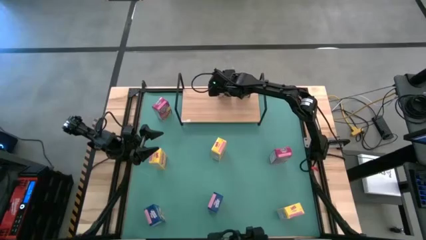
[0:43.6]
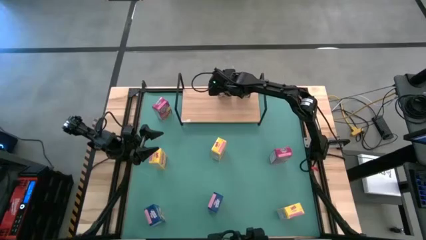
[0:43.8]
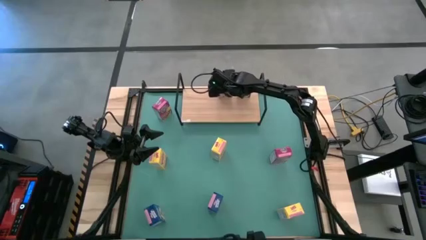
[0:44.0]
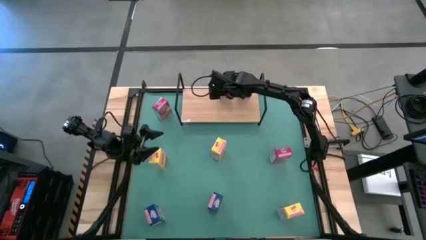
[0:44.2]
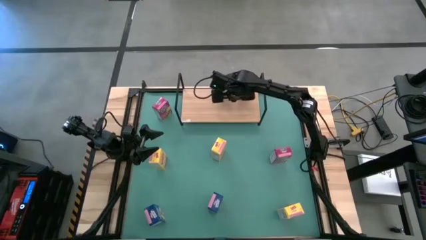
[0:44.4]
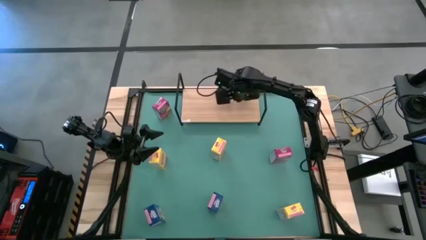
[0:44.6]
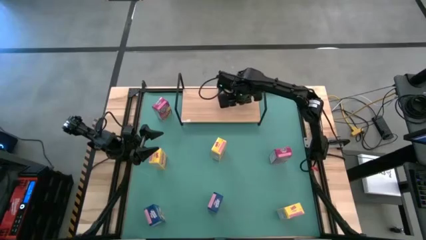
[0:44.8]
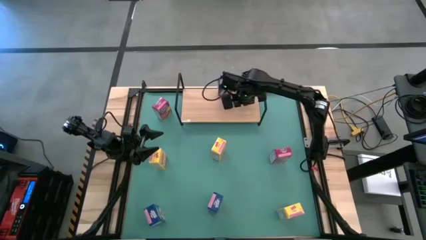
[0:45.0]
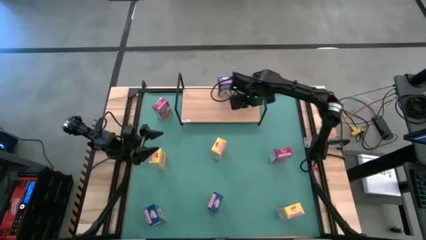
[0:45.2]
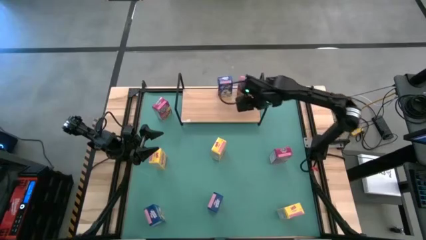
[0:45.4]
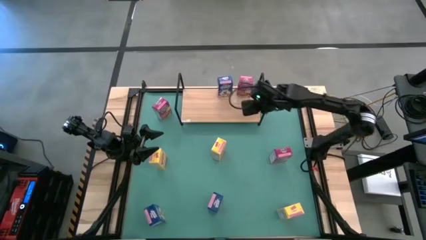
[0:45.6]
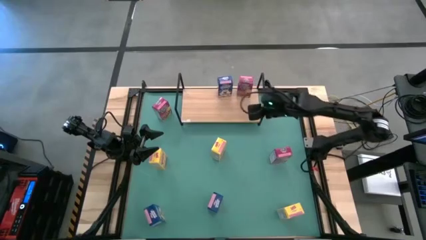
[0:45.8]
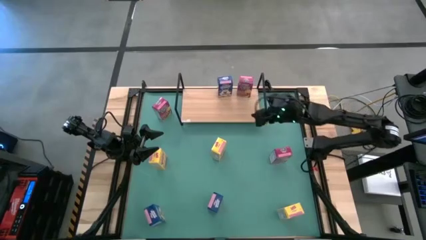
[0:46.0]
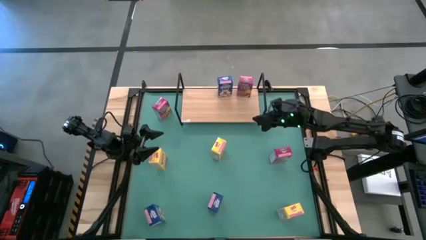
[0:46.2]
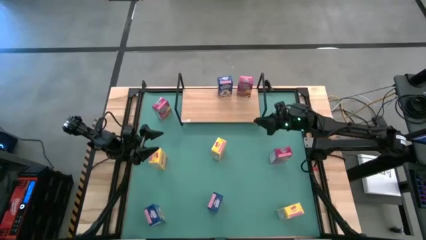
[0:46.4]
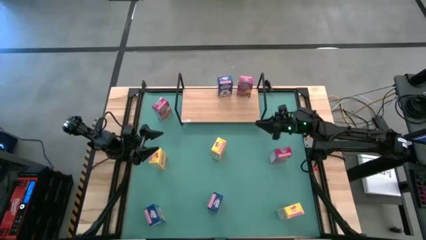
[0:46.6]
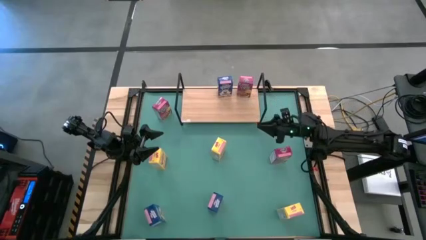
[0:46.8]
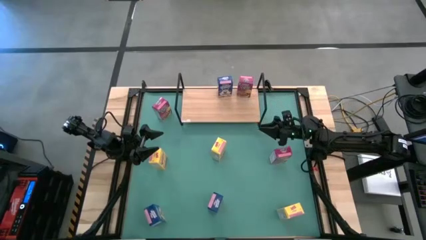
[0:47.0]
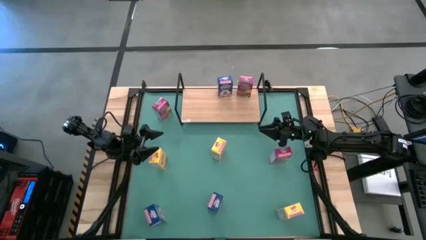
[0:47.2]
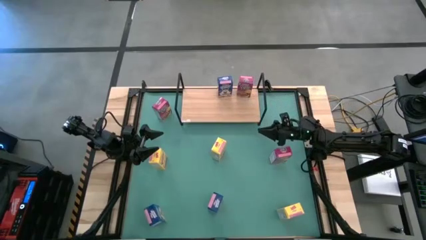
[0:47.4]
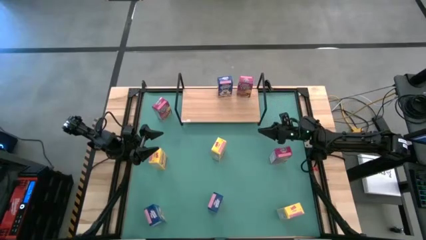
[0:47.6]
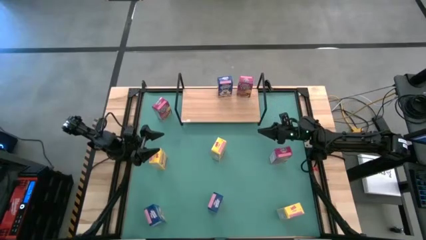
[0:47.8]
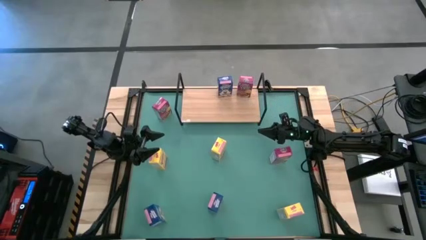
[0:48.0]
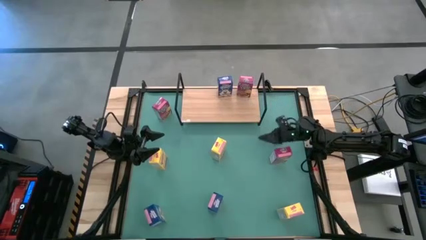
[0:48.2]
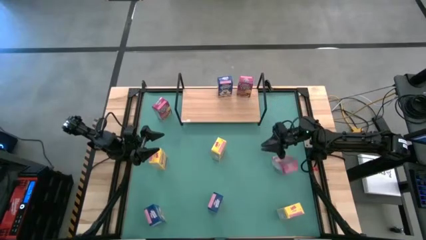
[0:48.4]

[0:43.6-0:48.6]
Task: Stack cereal on shelf
Put the right pink cereal box on the shelf aligned with the other pink cereal box

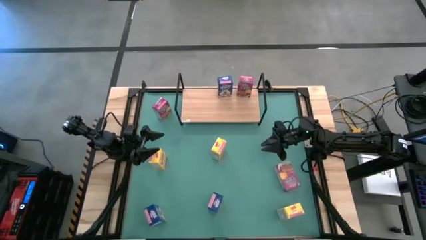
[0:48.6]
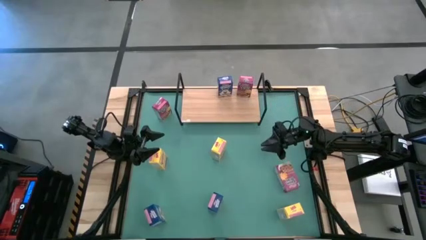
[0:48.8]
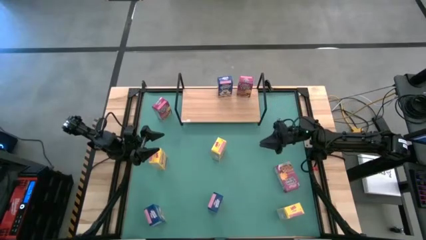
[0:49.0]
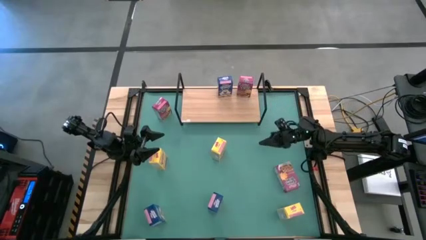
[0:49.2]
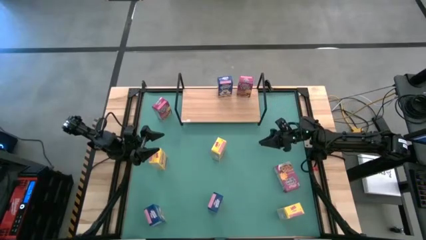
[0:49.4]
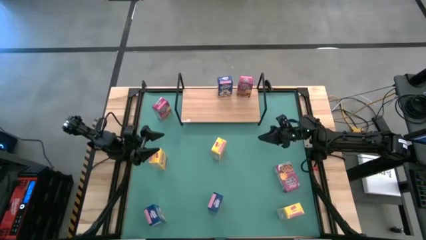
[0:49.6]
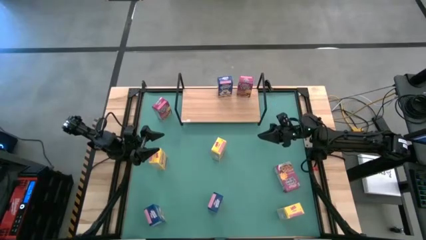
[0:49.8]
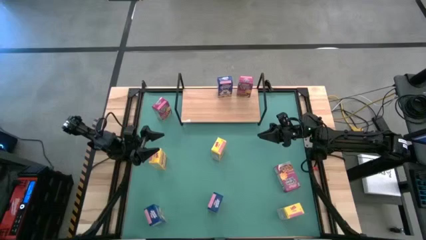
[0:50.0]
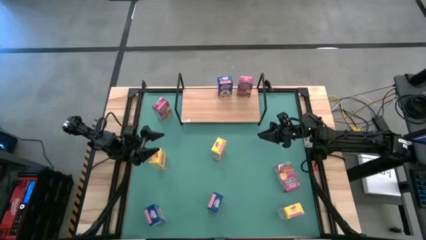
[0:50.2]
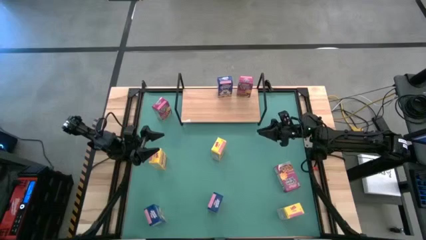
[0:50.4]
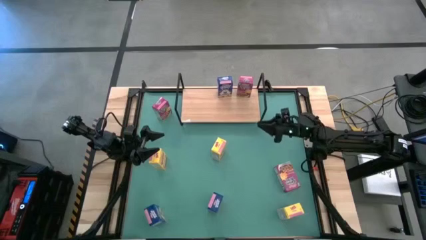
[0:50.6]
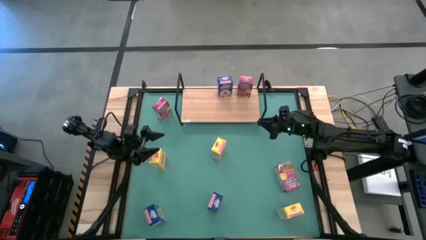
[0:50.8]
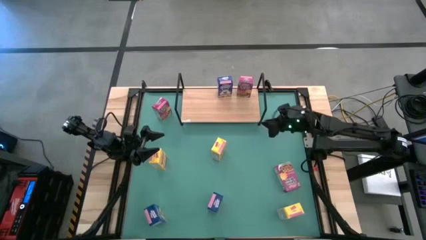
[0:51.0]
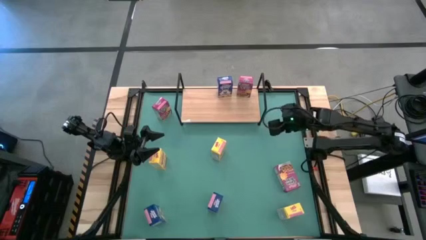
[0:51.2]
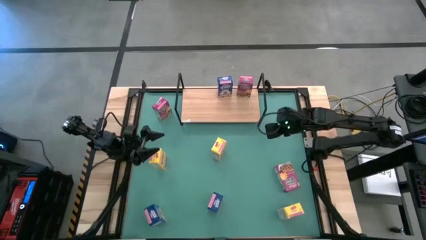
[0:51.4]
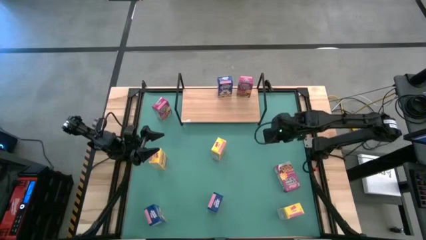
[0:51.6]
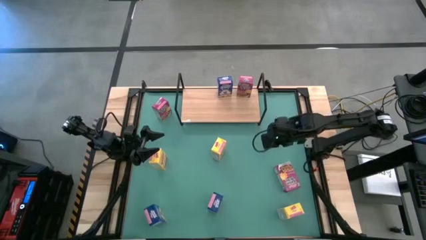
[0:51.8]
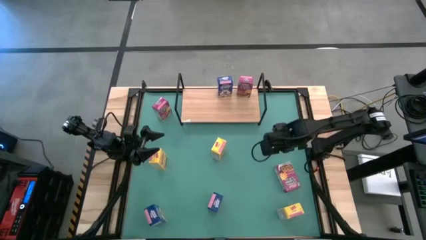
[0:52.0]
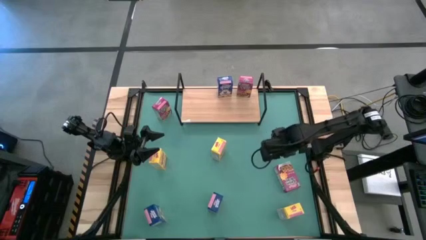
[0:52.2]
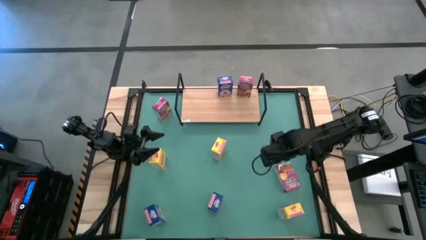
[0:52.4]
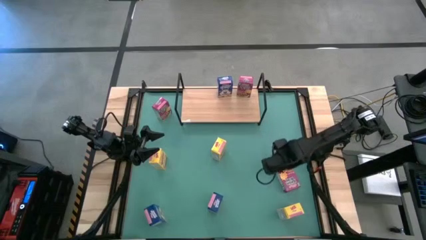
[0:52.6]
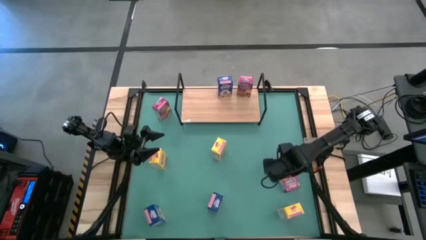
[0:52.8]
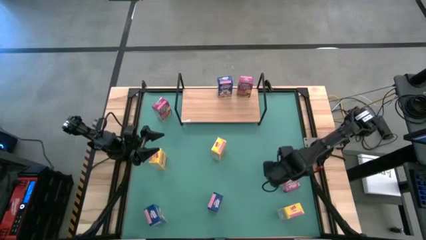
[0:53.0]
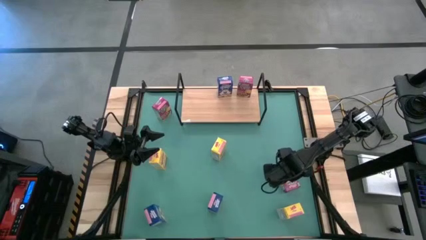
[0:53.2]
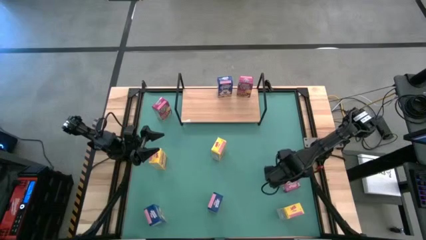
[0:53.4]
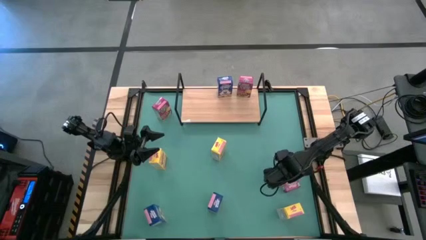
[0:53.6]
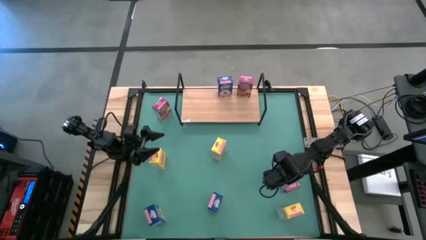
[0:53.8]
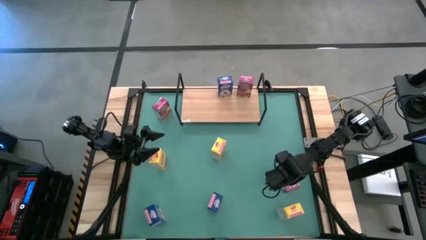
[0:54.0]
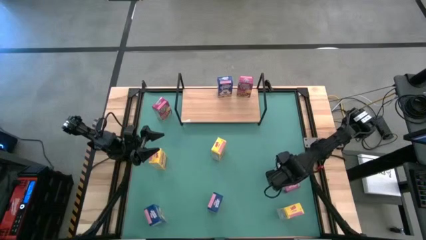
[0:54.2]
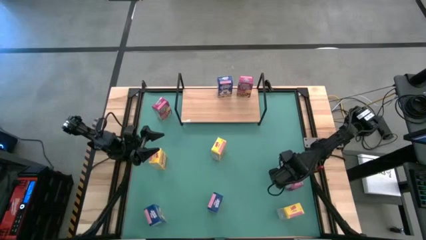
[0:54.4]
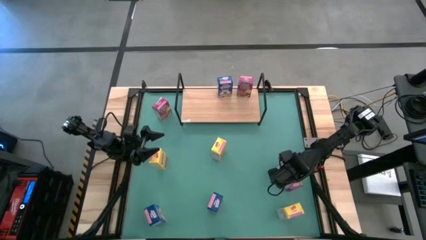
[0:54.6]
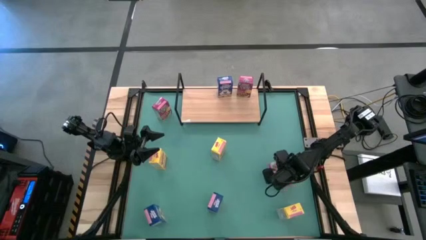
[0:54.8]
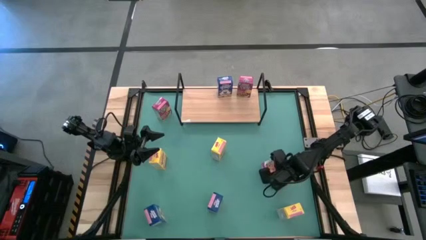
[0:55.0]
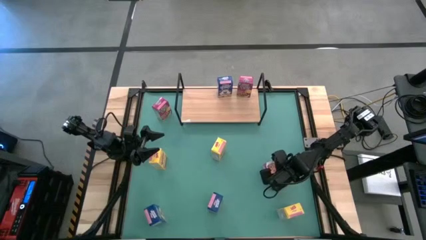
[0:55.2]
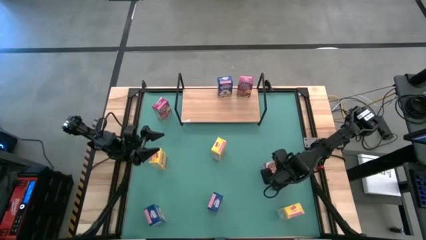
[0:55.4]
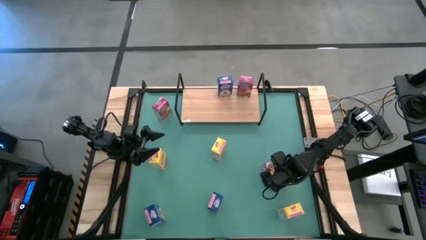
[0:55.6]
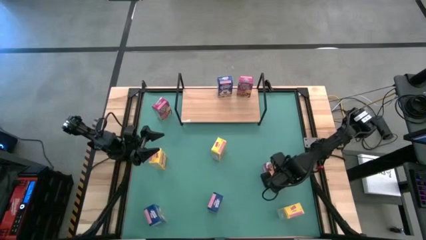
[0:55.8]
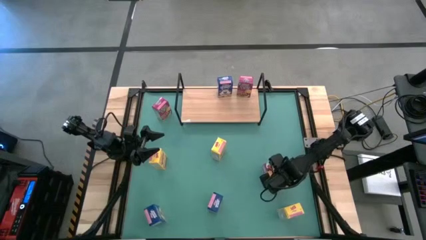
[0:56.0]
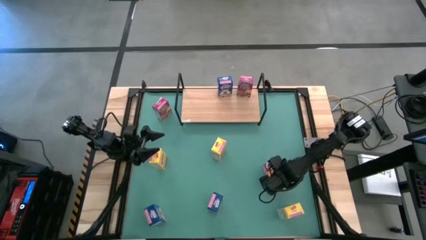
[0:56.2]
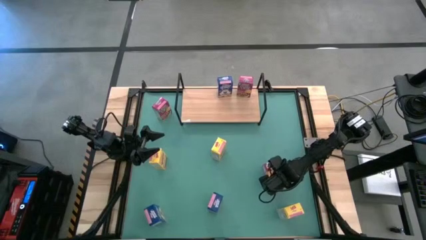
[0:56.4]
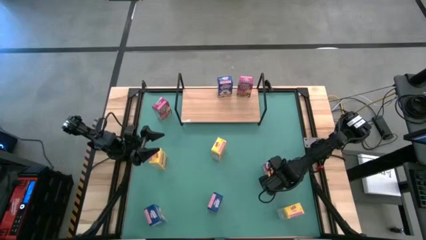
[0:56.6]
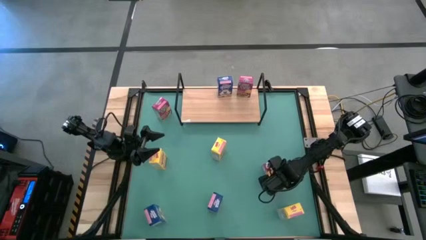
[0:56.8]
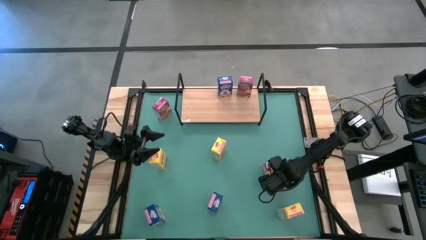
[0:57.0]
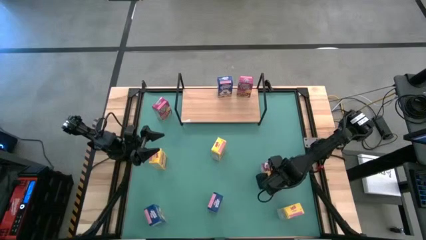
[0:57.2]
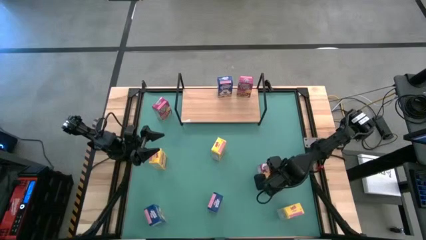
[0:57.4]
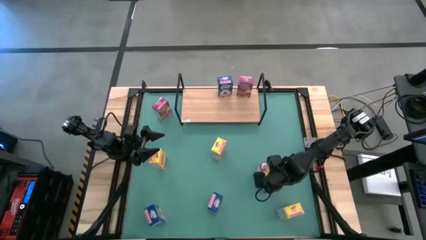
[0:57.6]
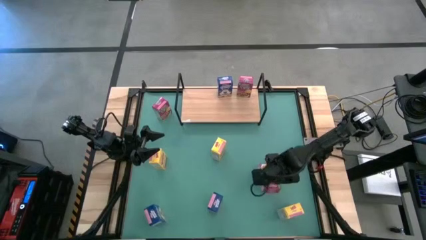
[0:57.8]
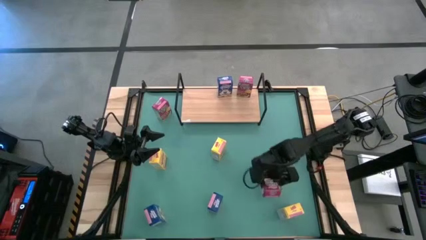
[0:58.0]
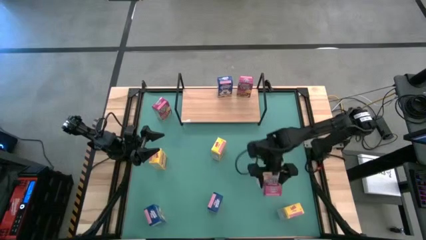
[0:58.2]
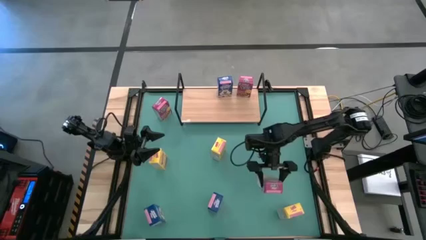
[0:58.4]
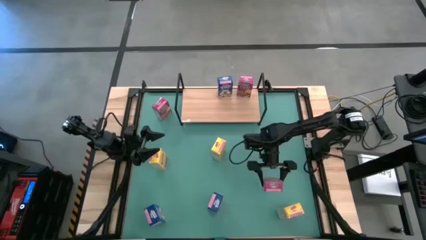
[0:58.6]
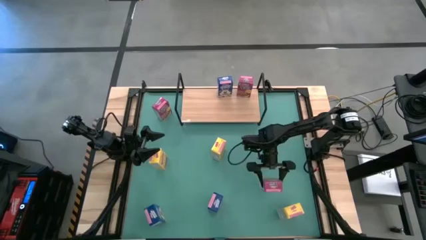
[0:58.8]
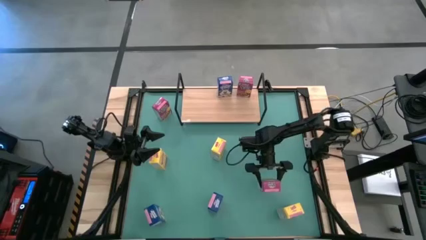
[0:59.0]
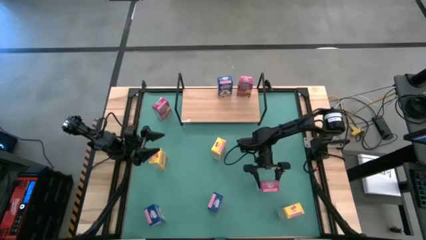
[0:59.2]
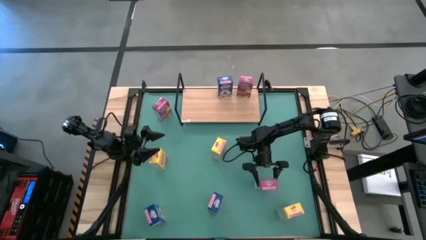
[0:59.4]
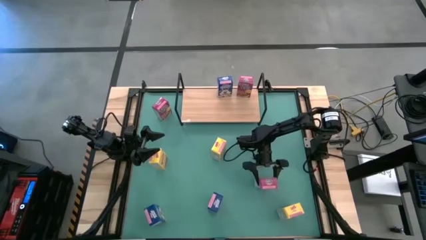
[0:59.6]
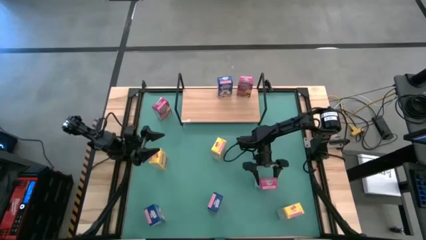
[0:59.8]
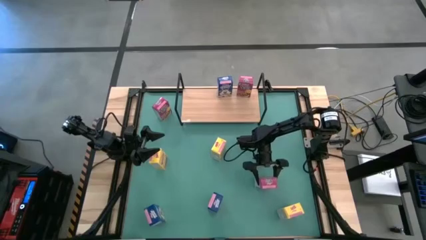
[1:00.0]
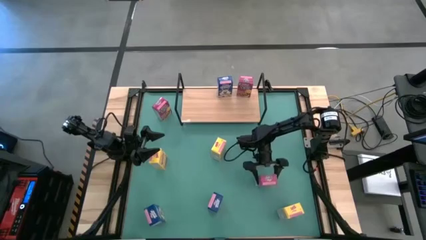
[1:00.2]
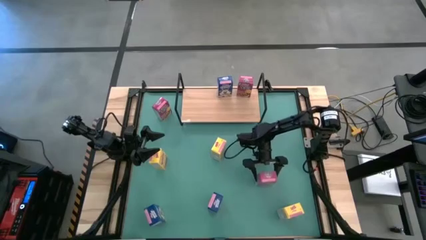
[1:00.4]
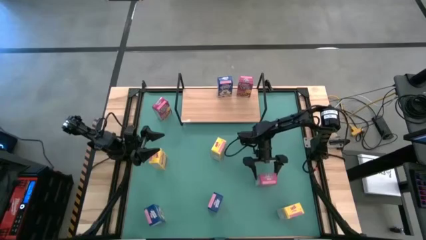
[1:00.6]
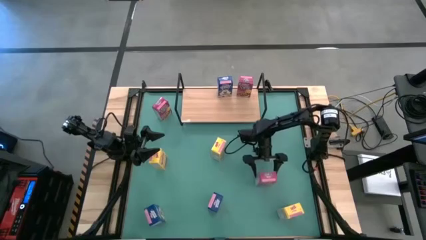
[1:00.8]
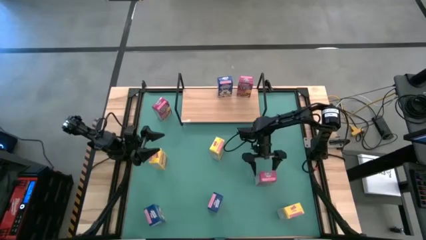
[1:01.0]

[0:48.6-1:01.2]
Put the right pink cereal box on the shelf aligned with the other pink cereal box
